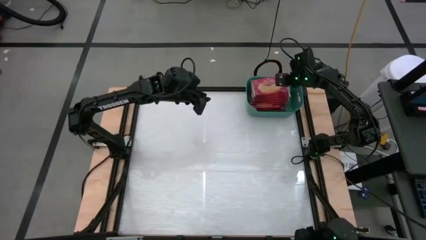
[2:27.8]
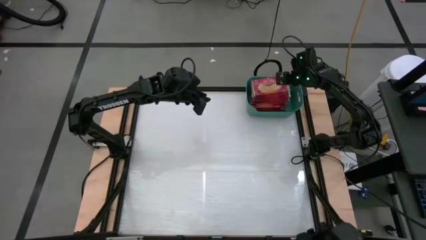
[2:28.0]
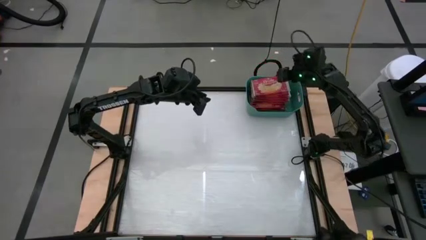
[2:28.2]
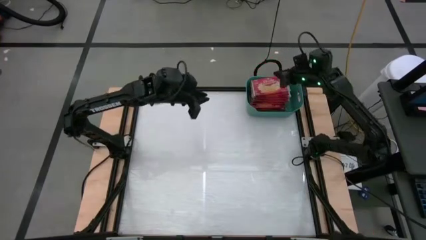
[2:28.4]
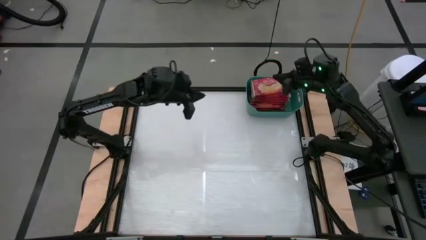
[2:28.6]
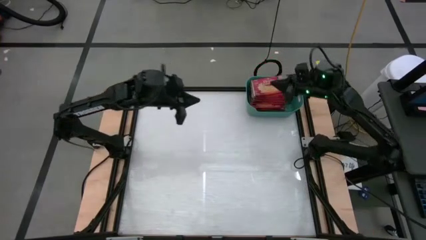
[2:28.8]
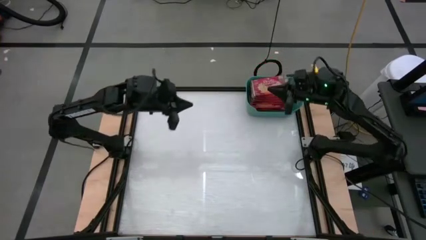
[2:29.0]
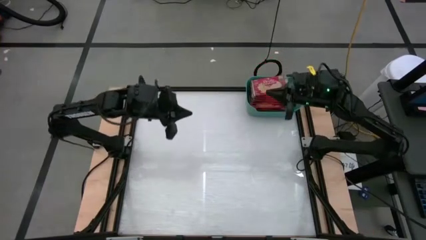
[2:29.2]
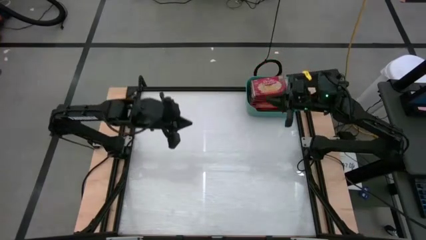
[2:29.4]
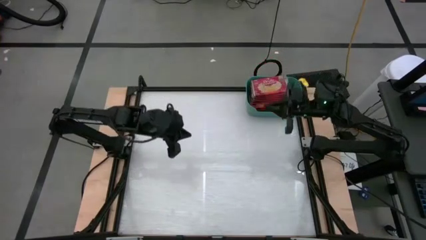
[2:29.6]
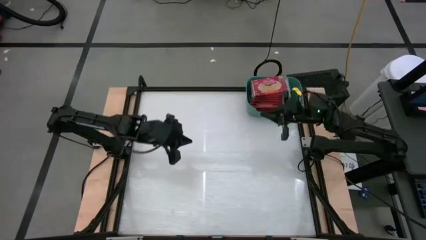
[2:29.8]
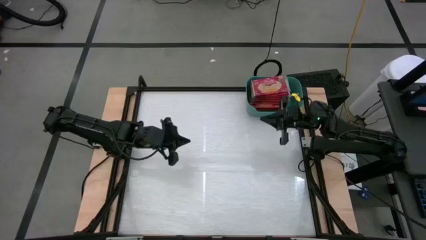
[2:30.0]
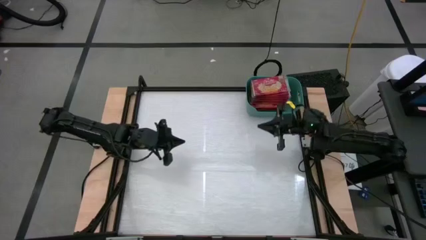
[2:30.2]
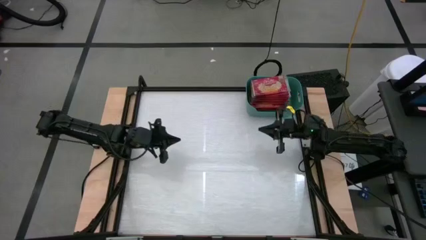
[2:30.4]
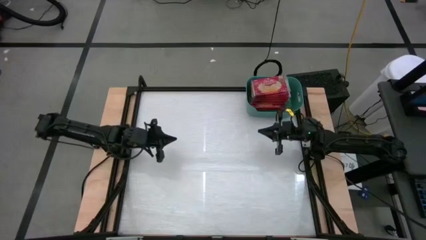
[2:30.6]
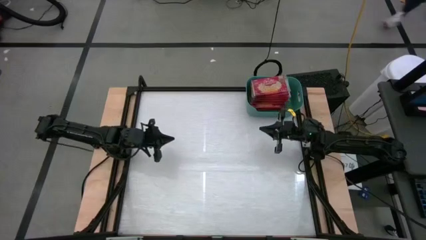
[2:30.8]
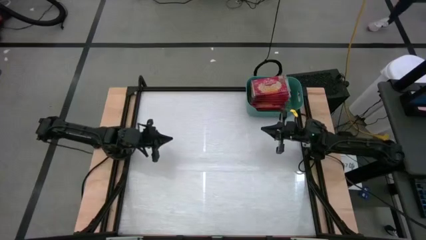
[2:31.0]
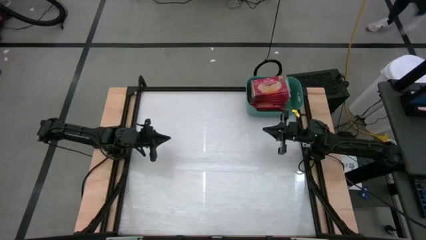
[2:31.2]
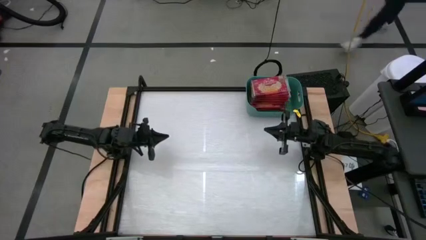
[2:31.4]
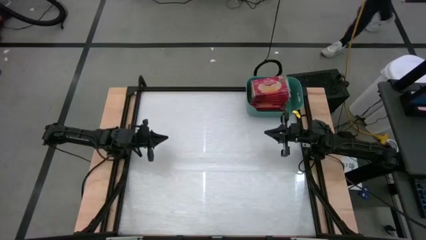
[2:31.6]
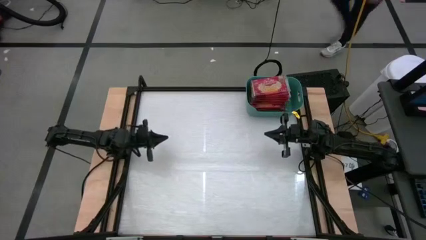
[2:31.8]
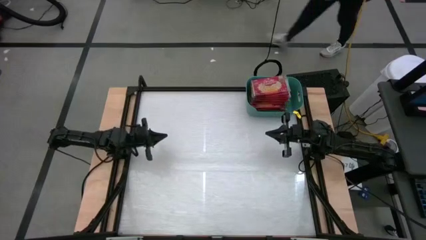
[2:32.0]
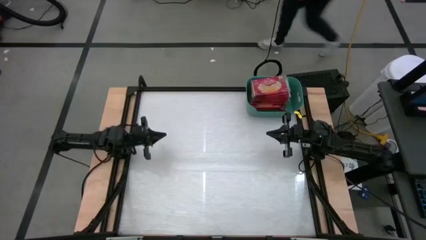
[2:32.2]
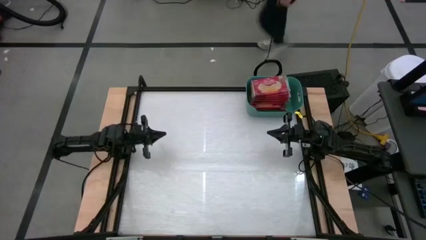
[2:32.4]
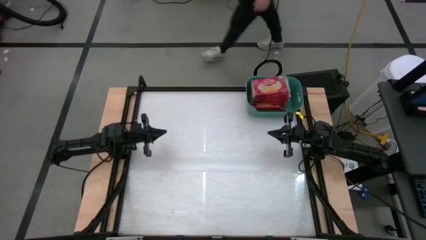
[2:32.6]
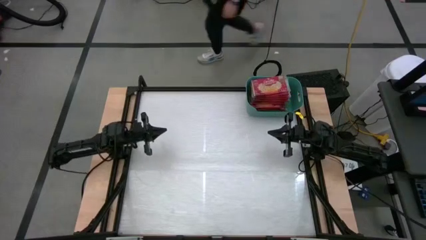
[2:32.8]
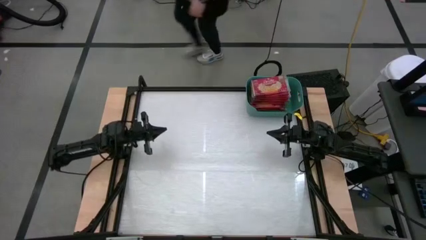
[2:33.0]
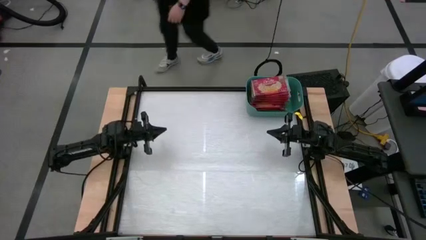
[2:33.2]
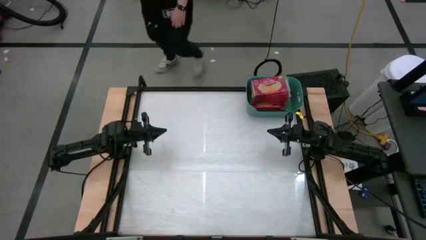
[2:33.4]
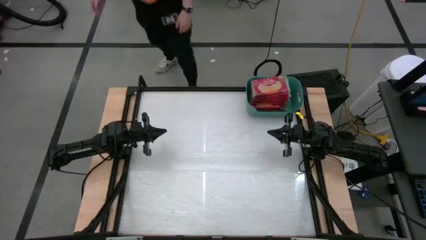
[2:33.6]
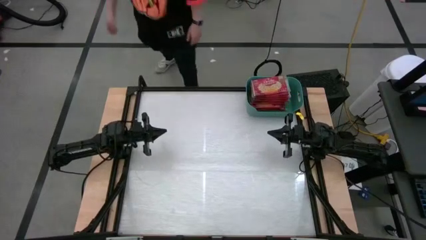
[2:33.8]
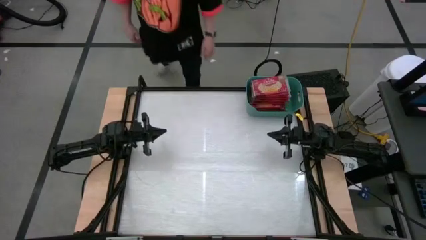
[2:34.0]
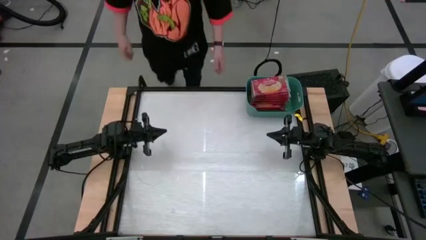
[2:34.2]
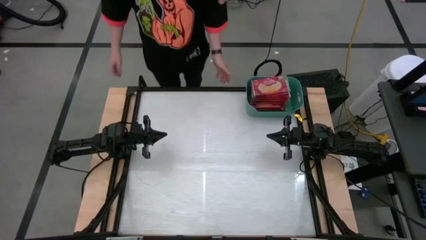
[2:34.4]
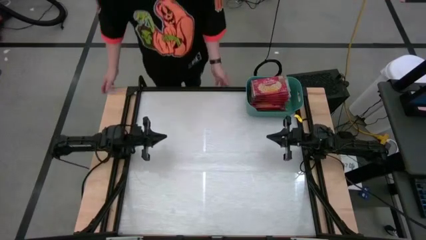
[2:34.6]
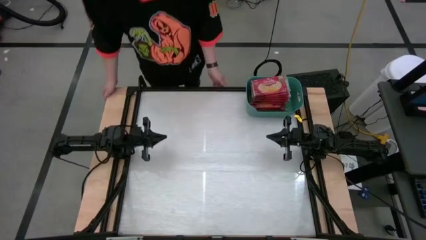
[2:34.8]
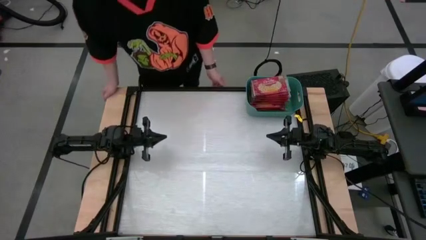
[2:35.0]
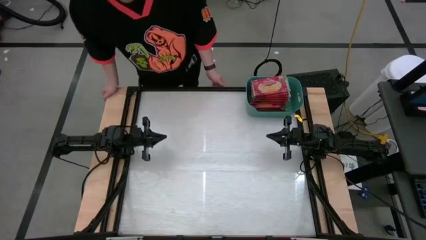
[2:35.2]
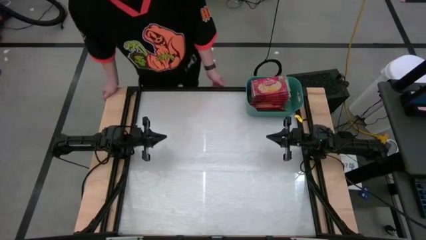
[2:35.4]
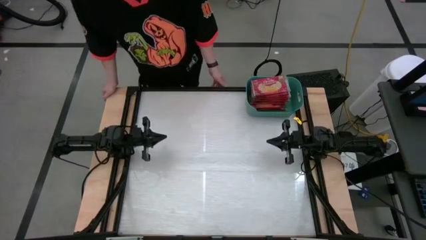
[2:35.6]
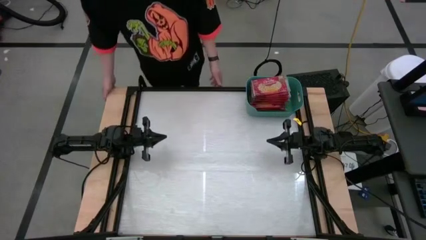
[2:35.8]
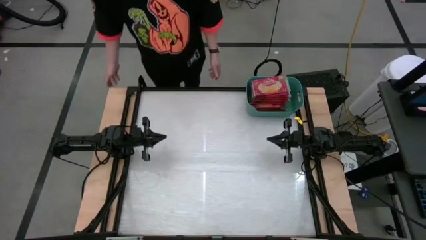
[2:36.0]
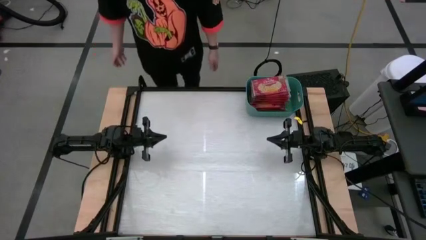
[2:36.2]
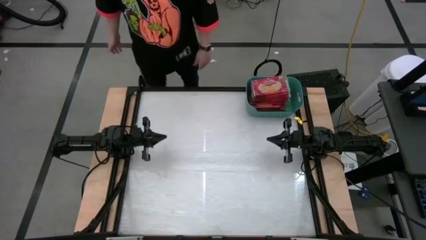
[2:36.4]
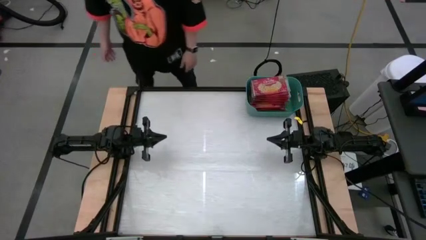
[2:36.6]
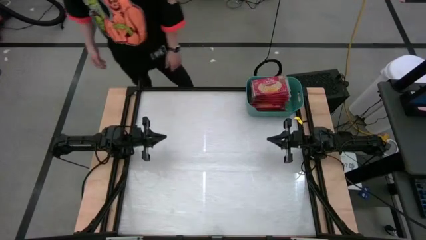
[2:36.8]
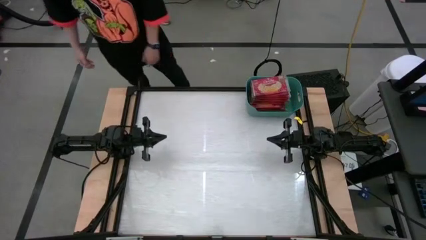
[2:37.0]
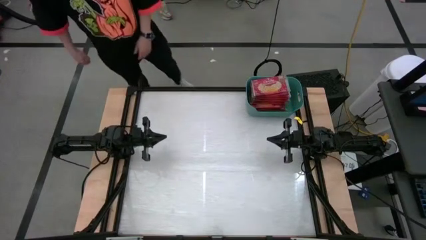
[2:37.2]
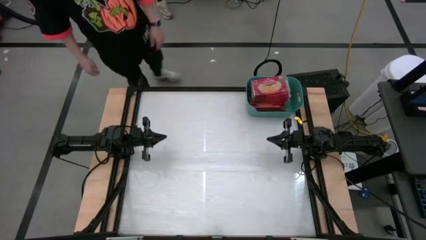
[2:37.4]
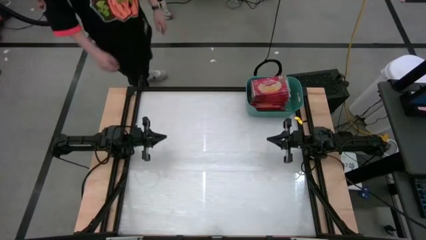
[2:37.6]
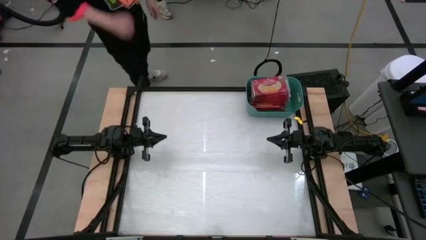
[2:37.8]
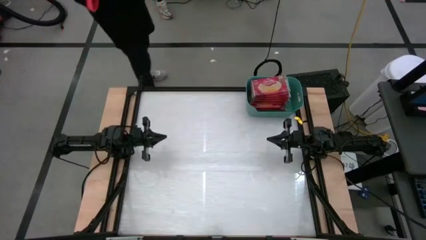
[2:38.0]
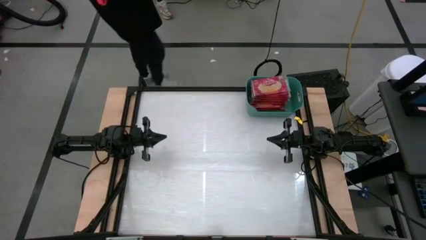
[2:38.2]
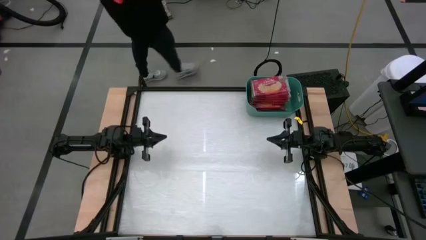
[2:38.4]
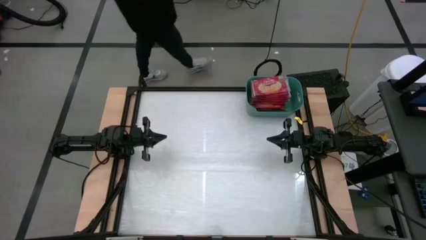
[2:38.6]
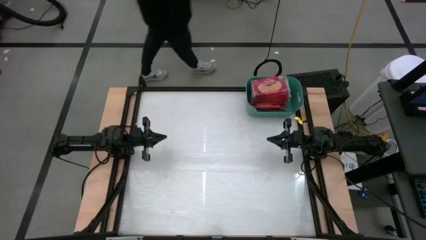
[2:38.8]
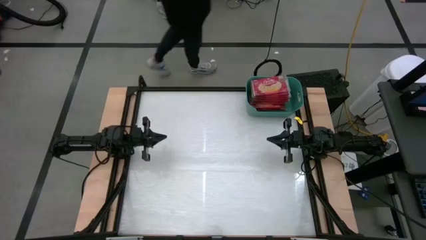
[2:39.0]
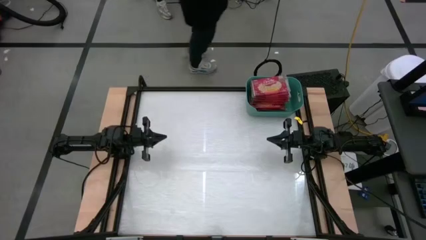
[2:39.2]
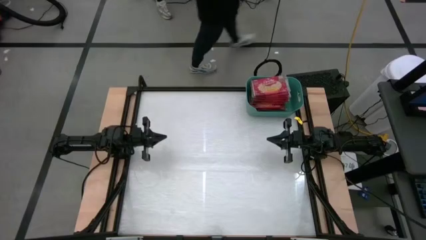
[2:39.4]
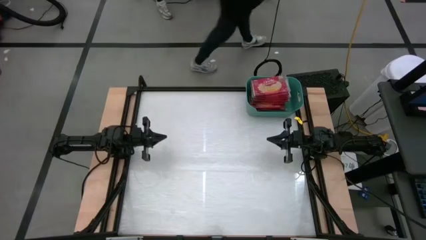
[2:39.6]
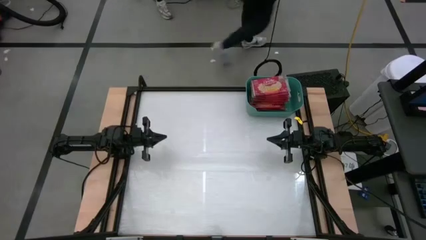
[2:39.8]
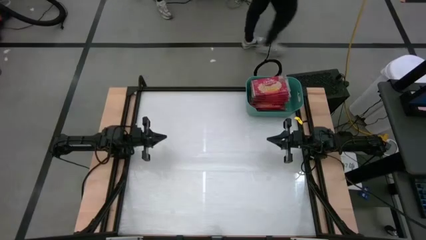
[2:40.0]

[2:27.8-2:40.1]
Task: Sort popcorn bags into baskets
Return to Home Position
